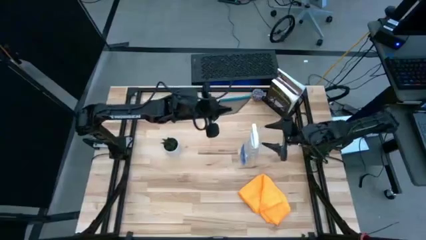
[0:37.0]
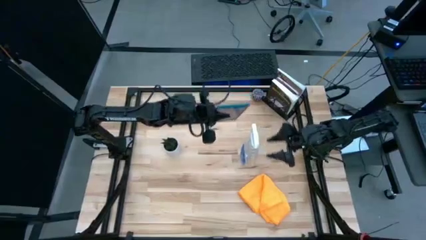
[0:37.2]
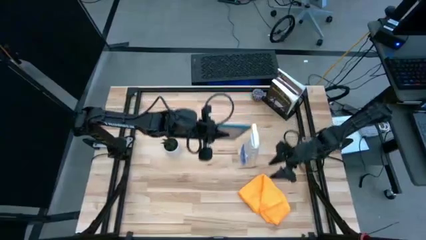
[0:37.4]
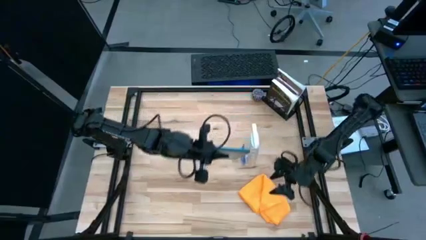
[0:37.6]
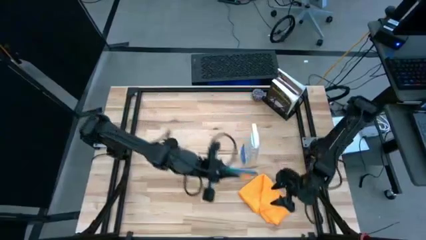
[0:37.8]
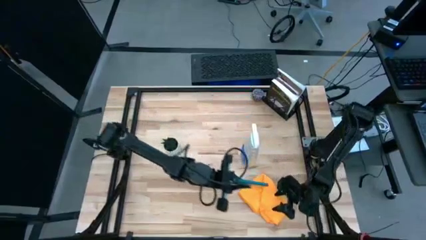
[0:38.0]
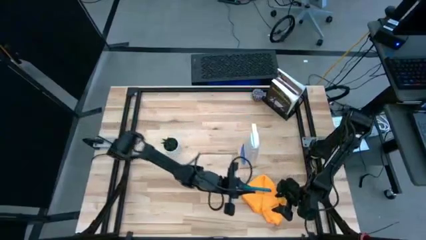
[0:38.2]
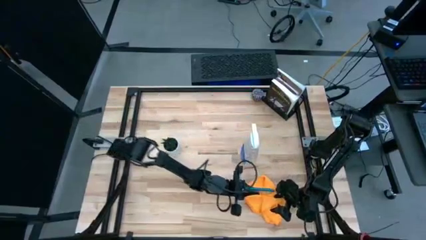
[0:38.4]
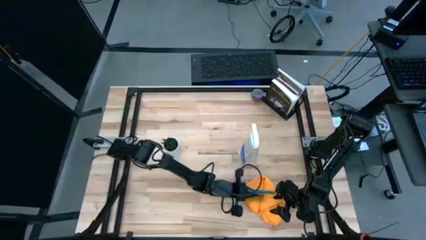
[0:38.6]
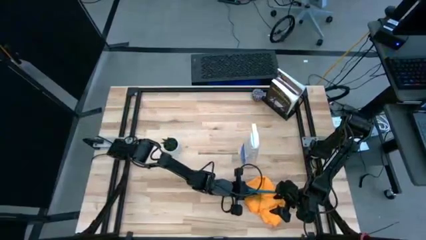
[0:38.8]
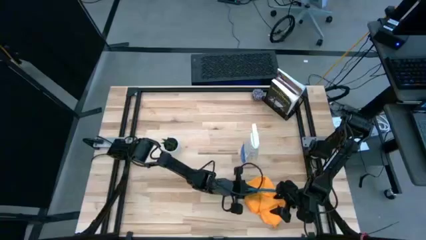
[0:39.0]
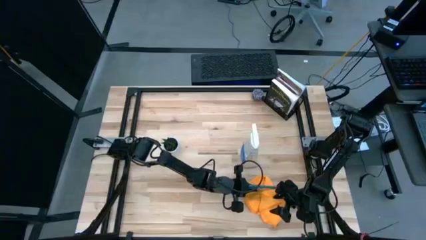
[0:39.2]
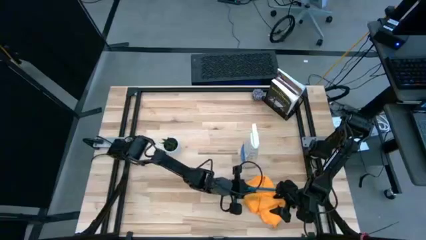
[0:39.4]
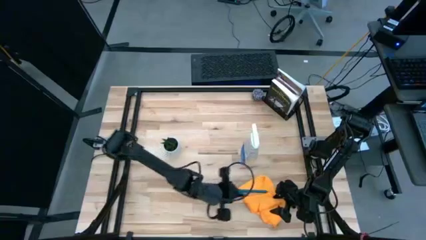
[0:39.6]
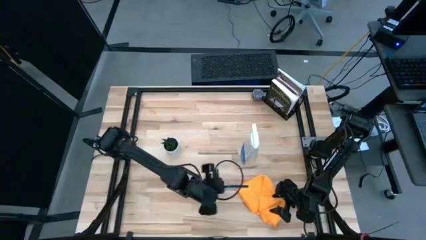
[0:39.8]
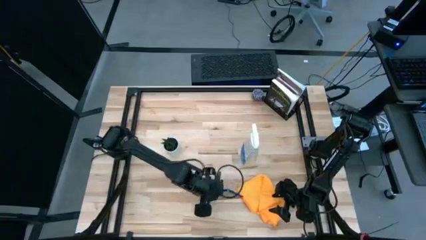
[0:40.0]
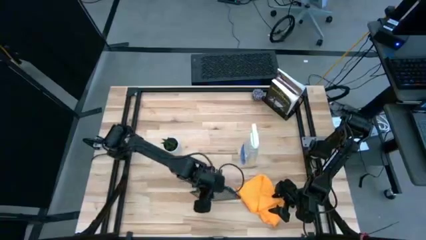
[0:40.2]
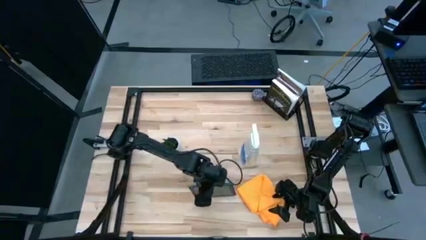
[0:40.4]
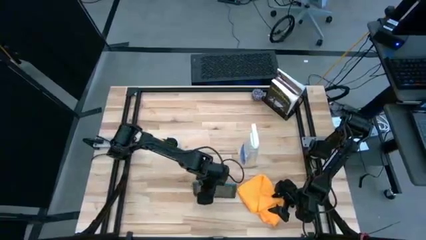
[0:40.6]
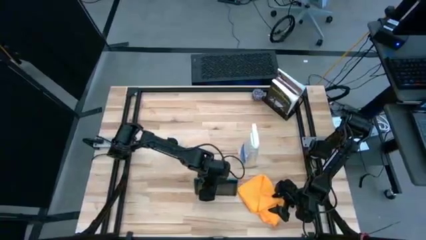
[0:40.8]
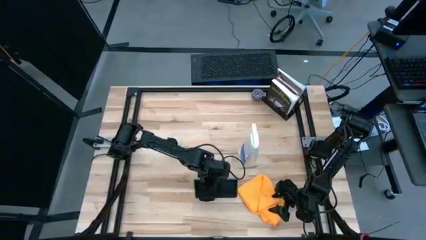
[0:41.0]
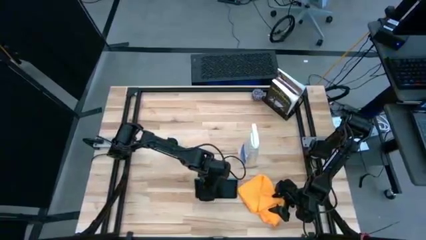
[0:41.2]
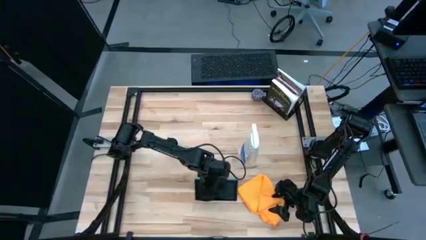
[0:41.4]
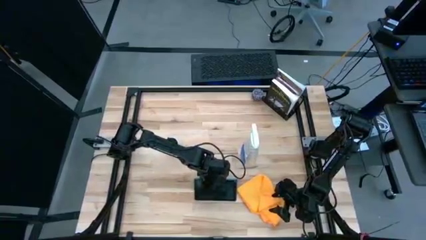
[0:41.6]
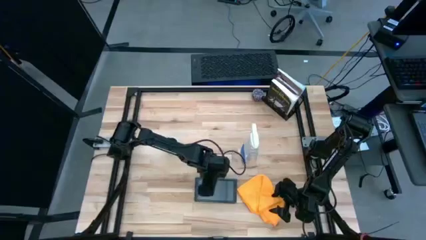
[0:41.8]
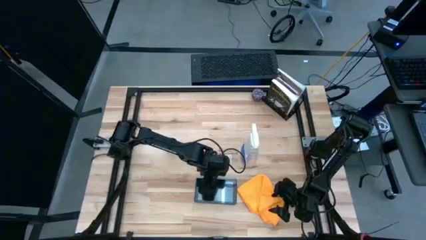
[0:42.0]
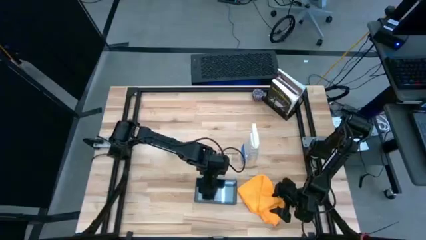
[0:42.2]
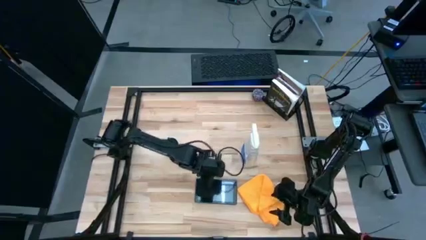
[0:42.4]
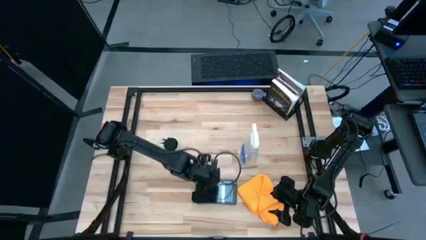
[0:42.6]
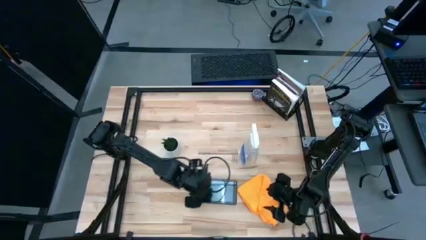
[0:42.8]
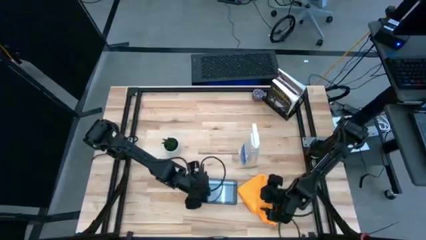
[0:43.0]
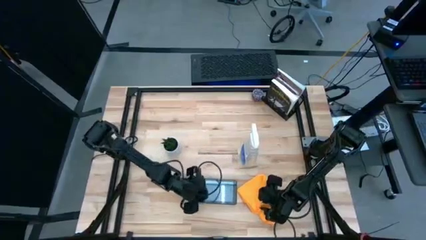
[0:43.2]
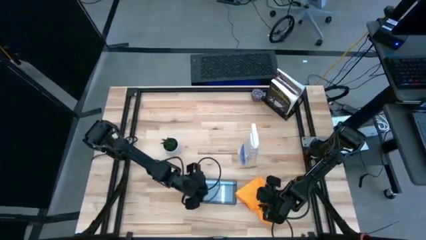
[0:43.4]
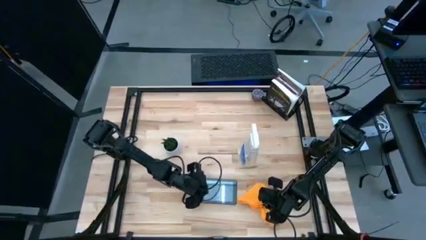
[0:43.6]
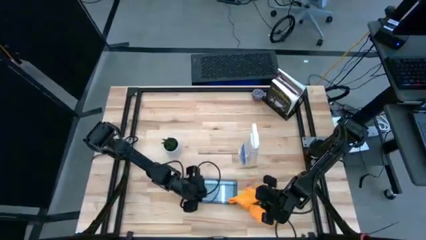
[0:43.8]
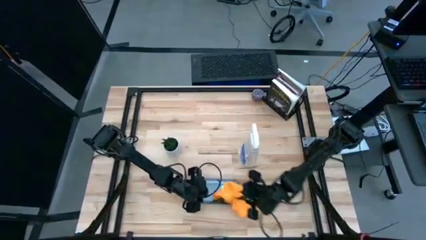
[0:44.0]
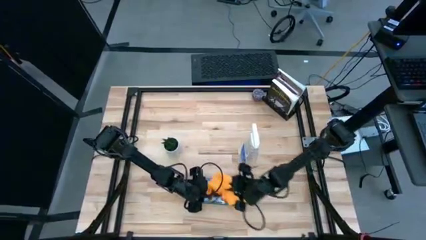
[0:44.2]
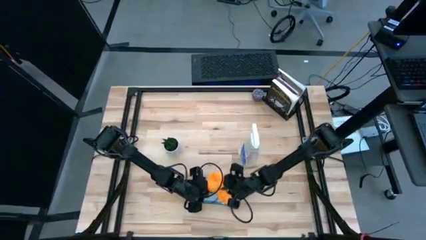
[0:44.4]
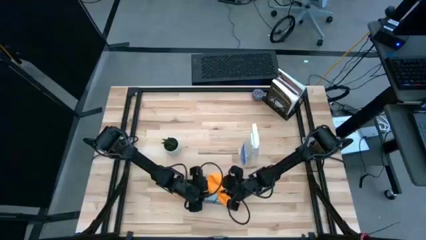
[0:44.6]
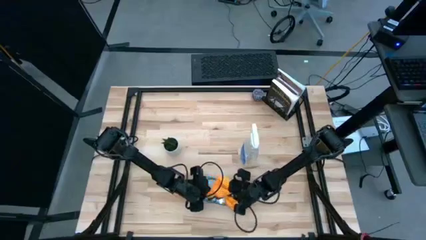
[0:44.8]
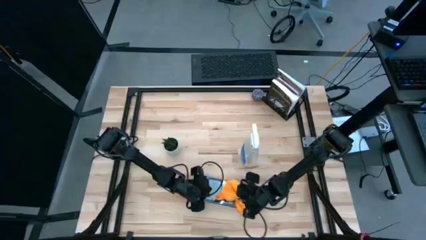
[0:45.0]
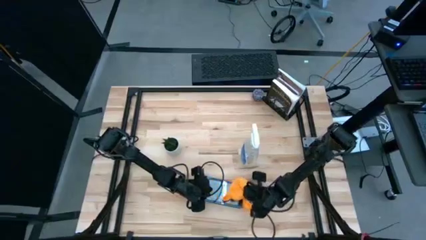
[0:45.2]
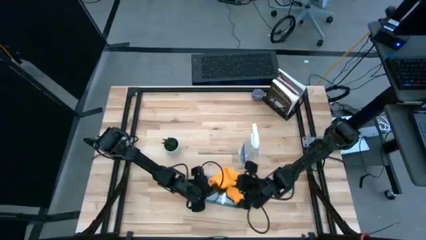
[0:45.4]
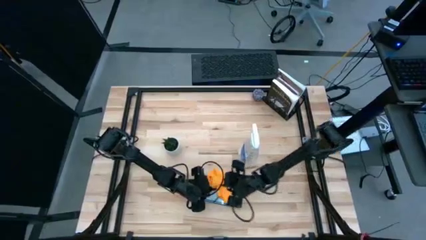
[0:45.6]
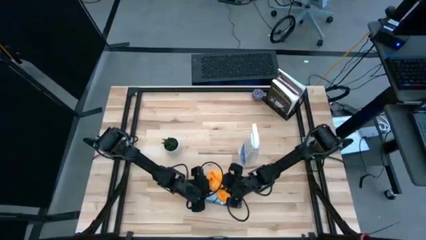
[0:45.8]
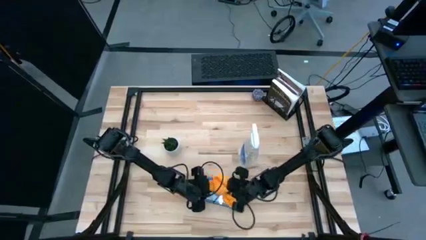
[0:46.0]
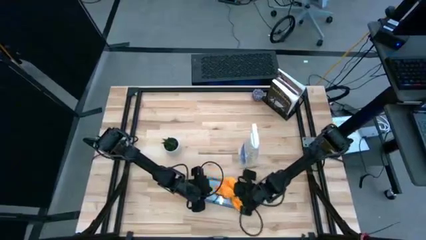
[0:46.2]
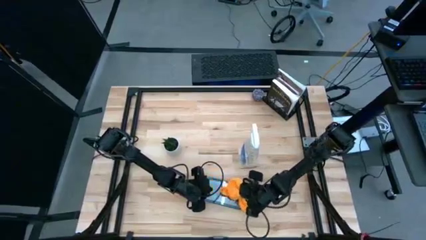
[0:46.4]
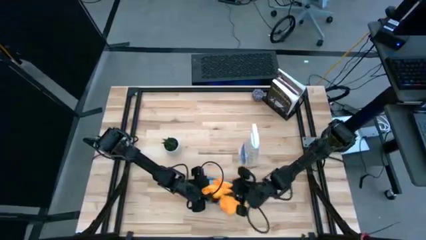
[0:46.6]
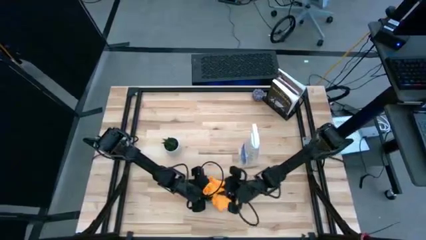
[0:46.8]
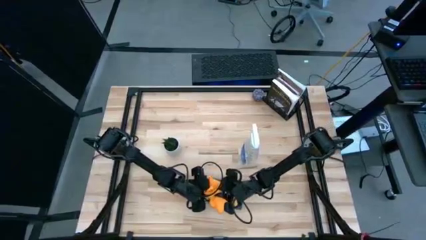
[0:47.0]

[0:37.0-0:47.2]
Task: Apply microfiber cloth
Wipe the tablet with the microfiber cloth

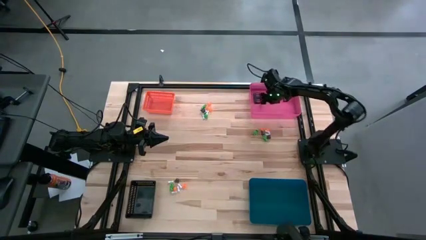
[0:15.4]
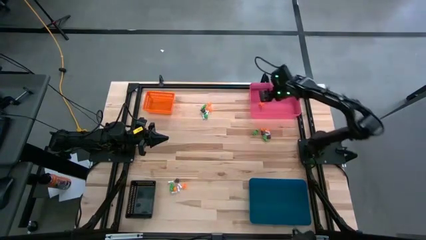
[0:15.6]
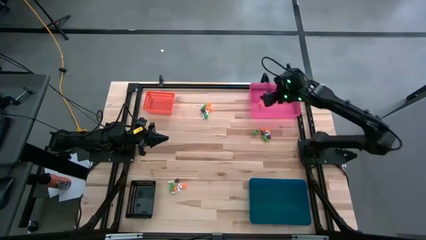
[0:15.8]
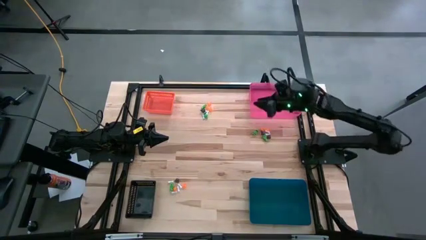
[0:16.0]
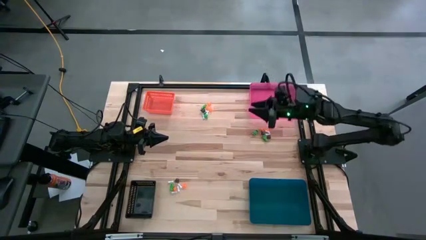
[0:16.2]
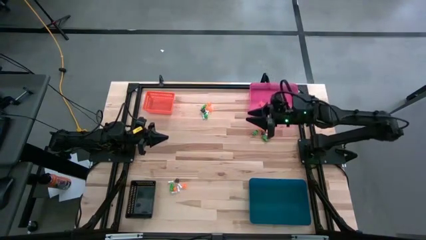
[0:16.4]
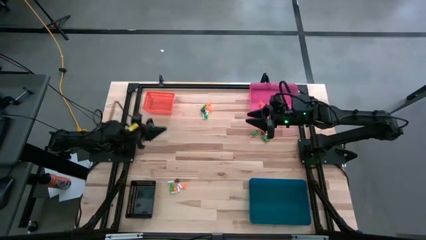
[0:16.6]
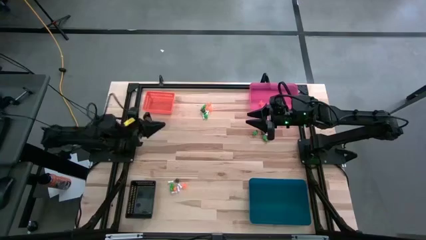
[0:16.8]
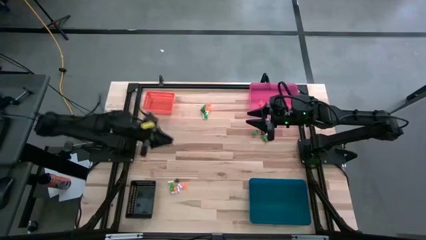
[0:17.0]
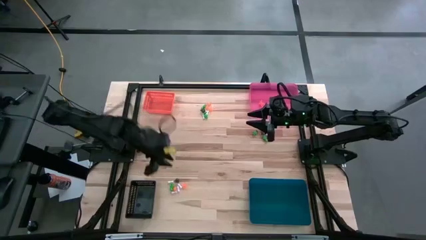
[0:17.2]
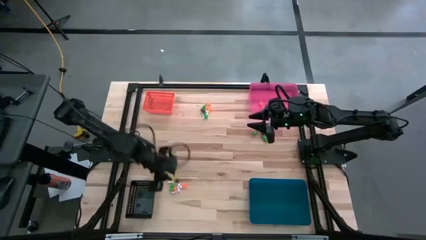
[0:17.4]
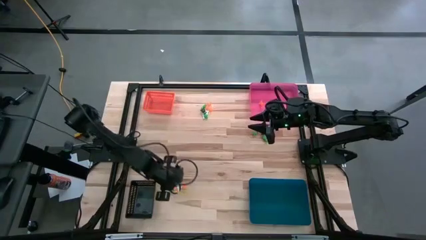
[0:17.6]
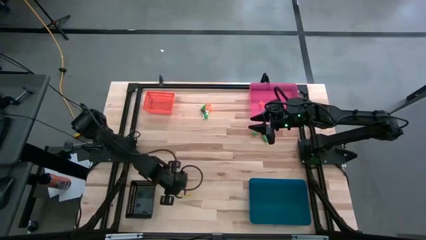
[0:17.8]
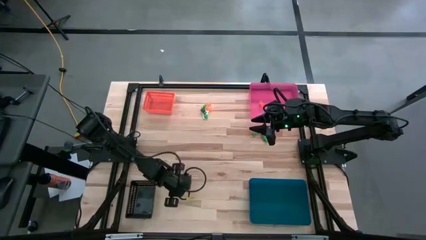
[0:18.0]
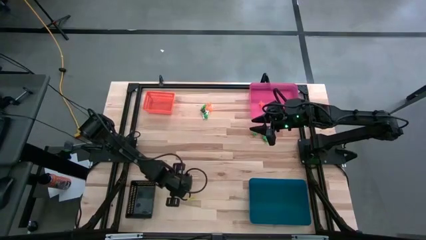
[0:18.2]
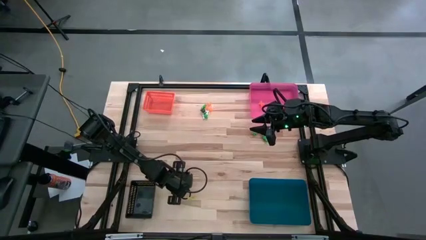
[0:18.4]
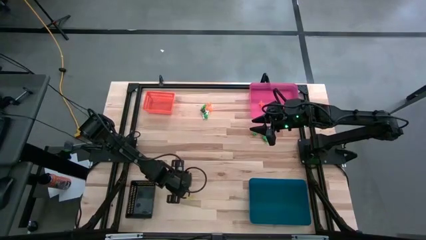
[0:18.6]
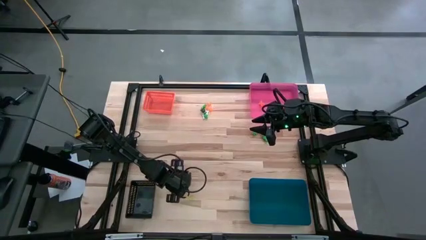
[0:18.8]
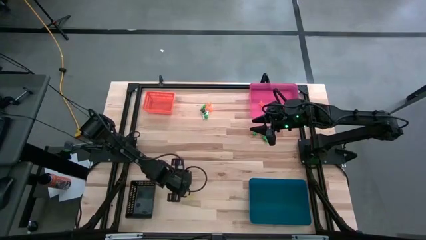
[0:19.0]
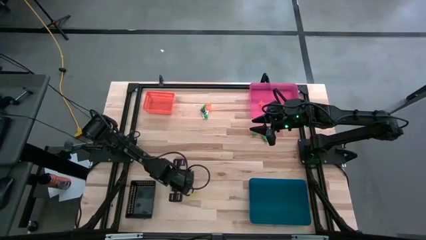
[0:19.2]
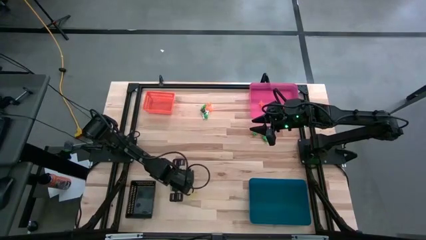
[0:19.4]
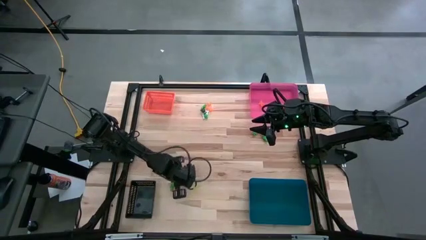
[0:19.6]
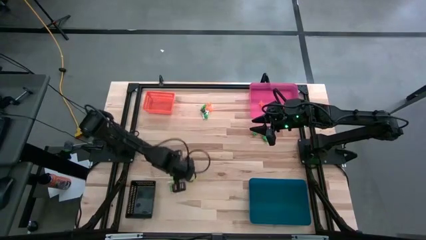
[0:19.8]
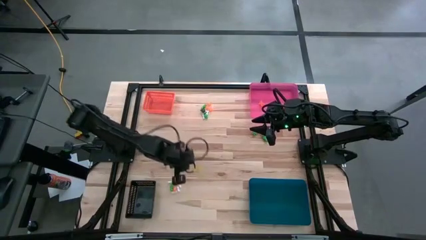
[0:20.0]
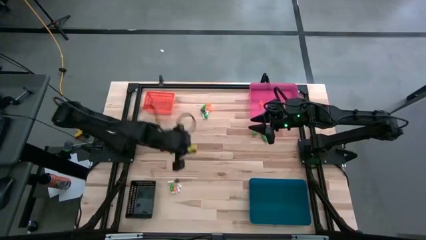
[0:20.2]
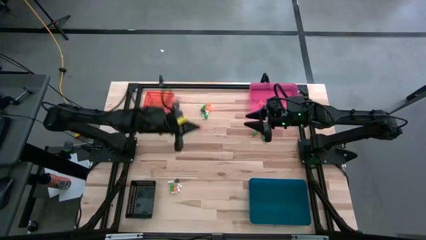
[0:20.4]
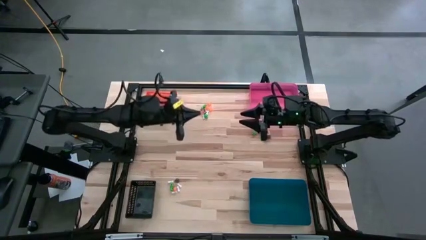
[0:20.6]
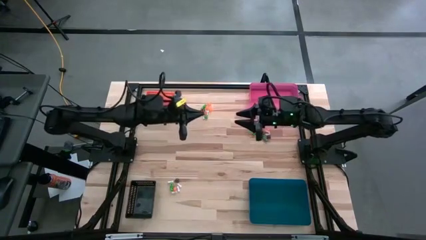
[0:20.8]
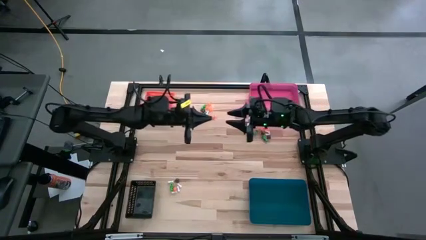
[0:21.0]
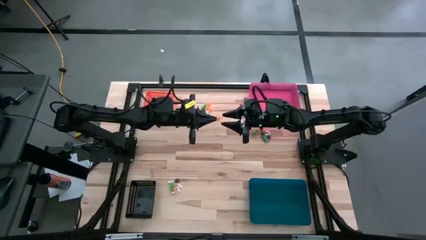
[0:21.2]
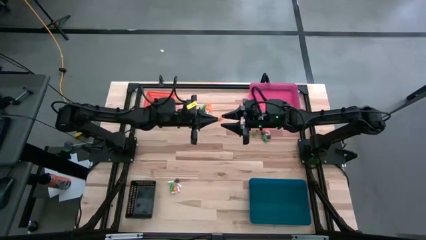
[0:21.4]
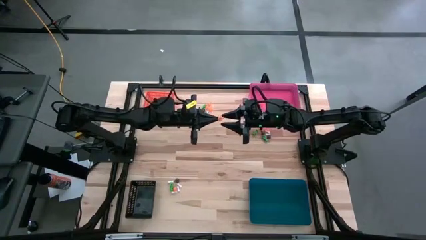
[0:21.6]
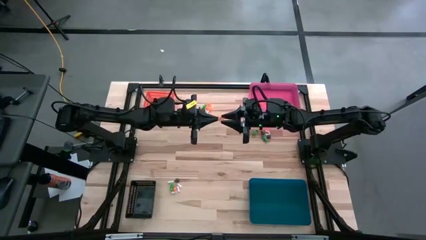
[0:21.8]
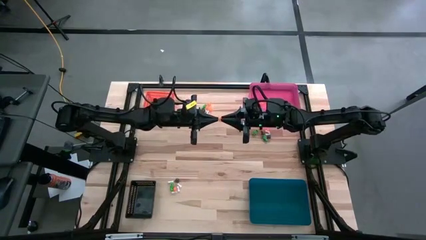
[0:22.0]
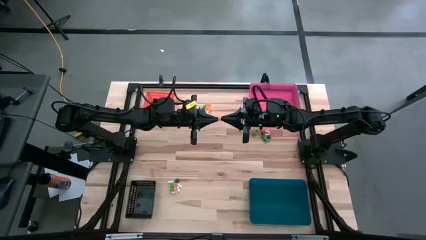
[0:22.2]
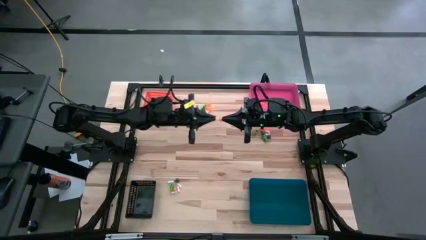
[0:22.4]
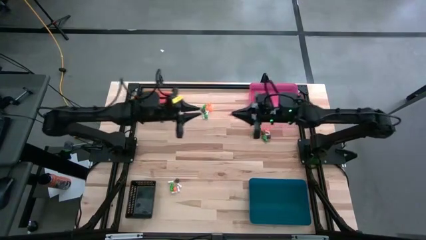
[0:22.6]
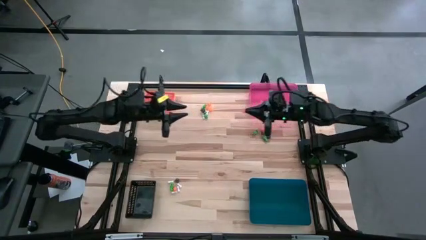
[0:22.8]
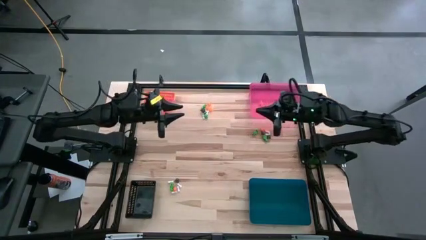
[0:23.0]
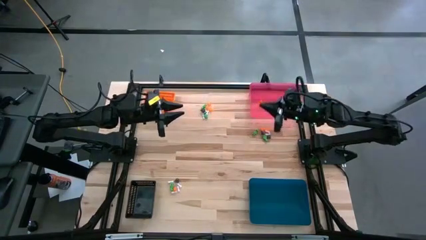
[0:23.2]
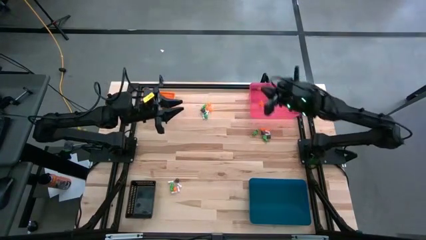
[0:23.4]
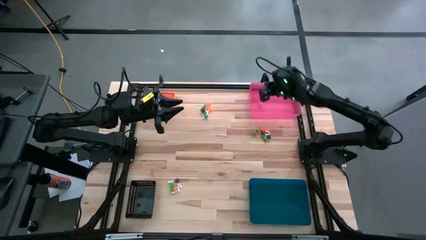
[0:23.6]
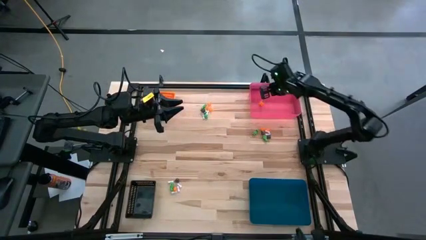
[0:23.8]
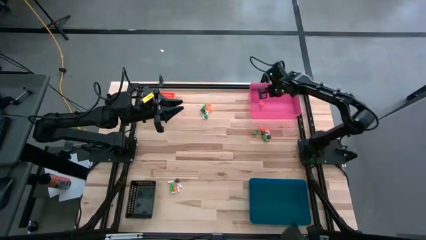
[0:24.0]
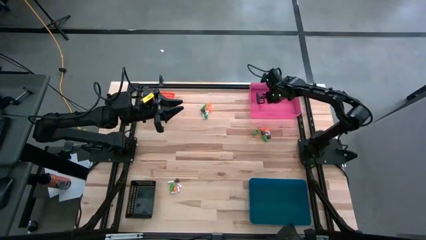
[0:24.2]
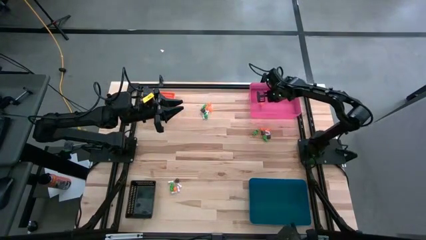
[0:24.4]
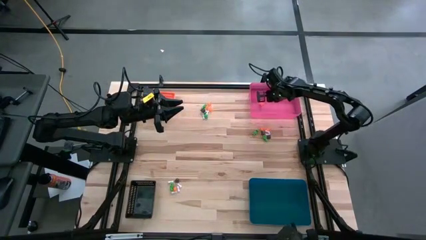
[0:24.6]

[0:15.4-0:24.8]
Task: Sort Halloween decoration
Put the orange spider toy into the pink bin
